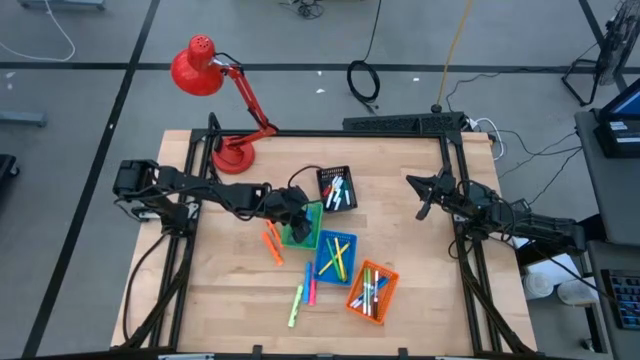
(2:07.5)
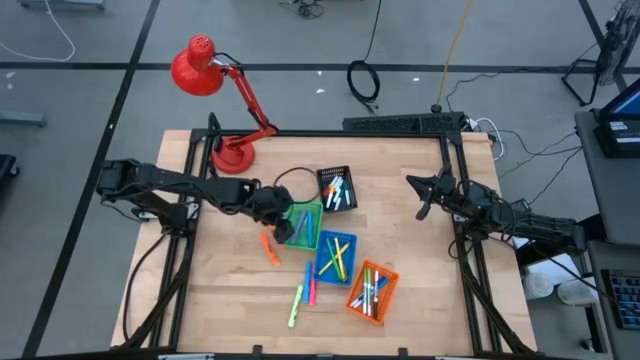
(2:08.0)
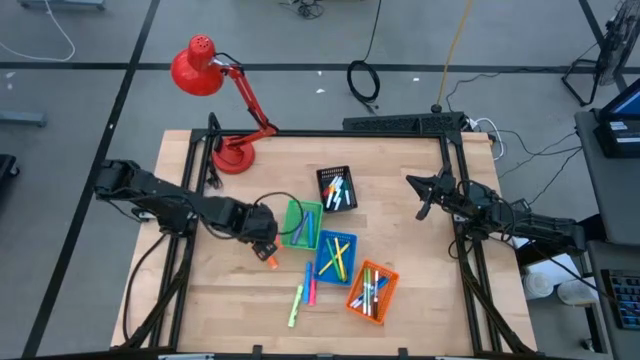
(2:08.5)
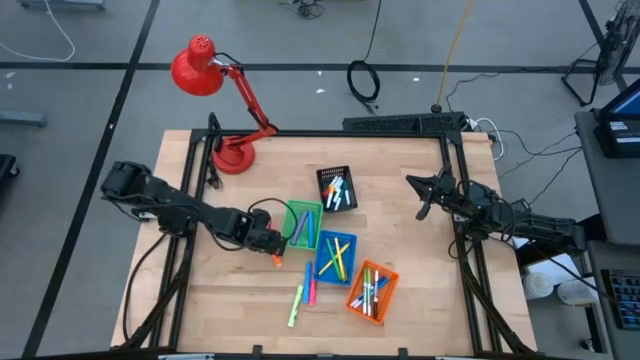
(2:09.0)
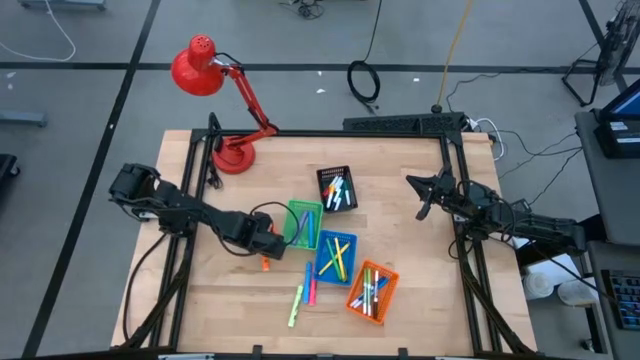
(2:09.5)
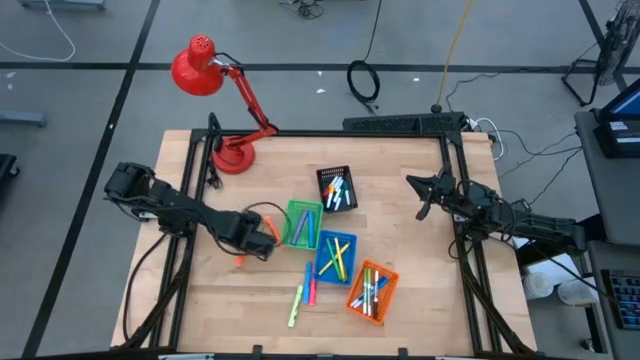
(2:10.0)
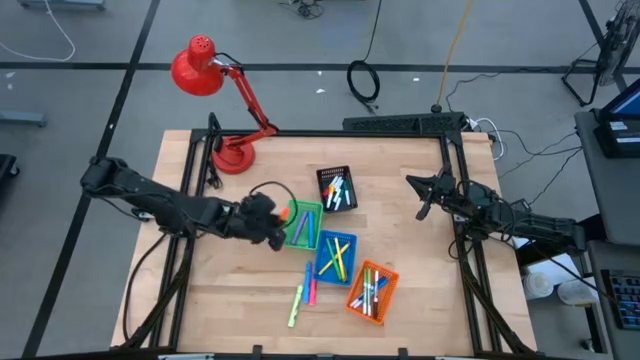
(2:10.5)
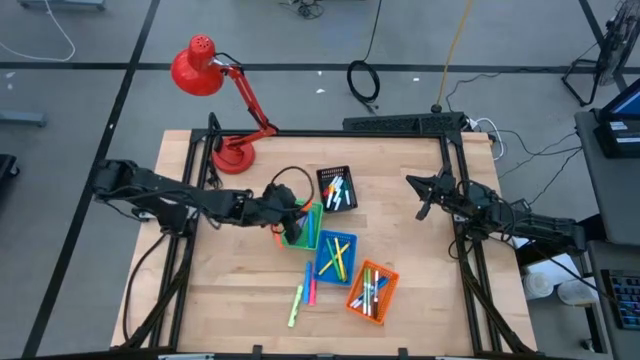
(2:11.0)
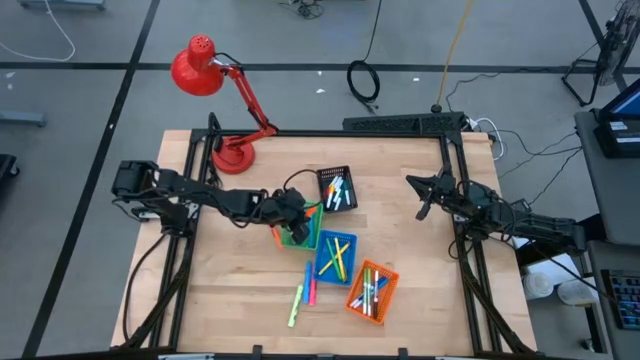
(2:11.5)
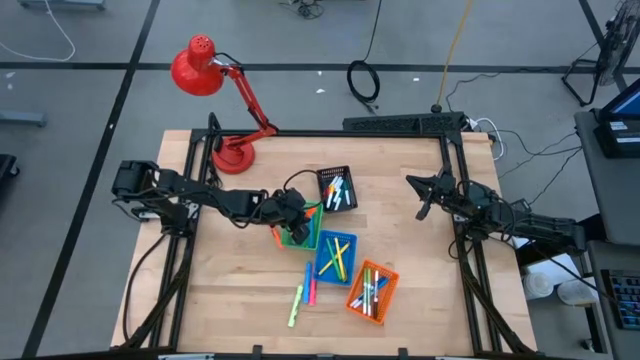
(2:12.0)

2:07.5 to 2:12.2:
Task: Pick & Place Markers
Put the left orange highlighter into the green basket

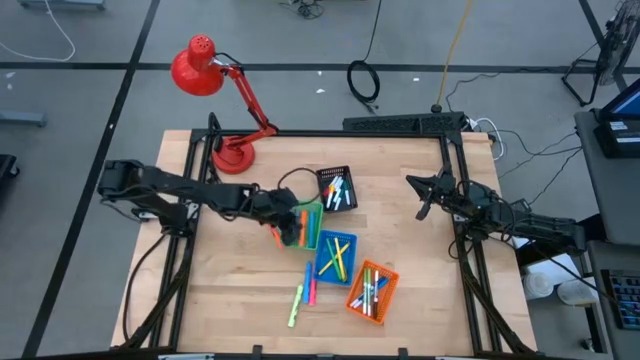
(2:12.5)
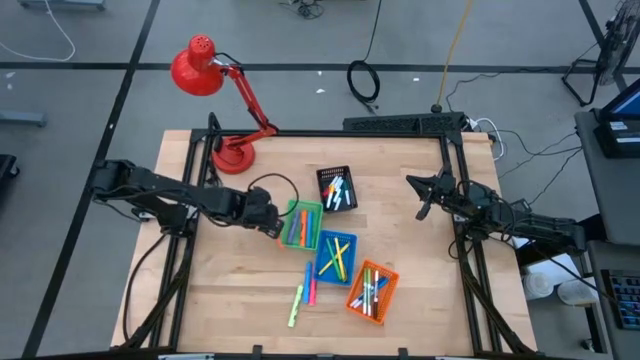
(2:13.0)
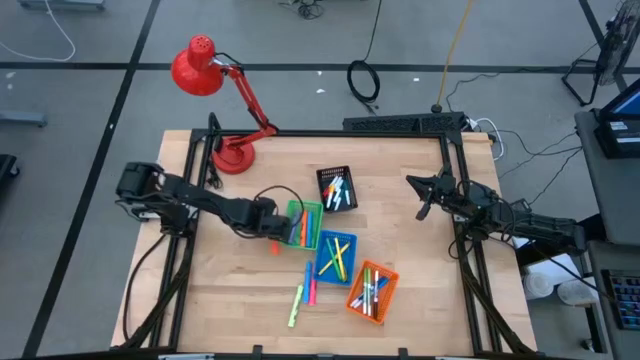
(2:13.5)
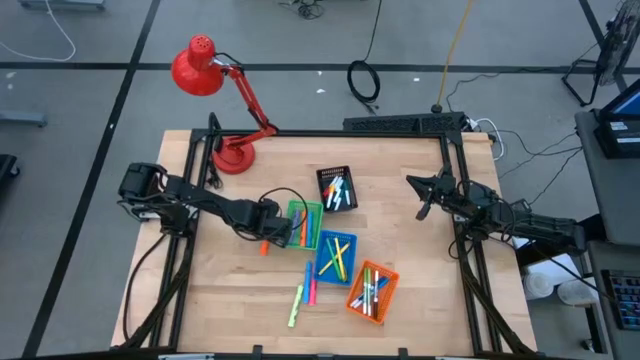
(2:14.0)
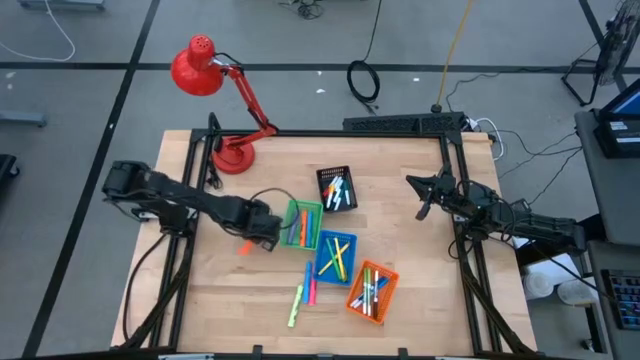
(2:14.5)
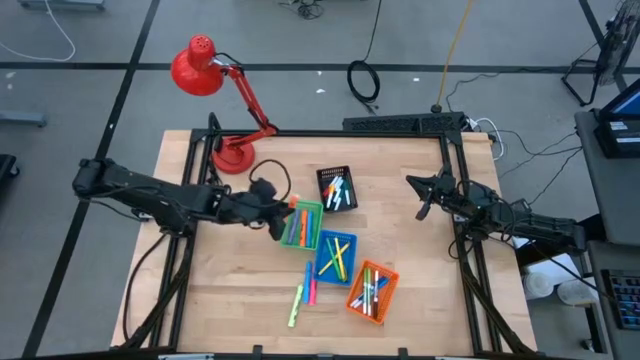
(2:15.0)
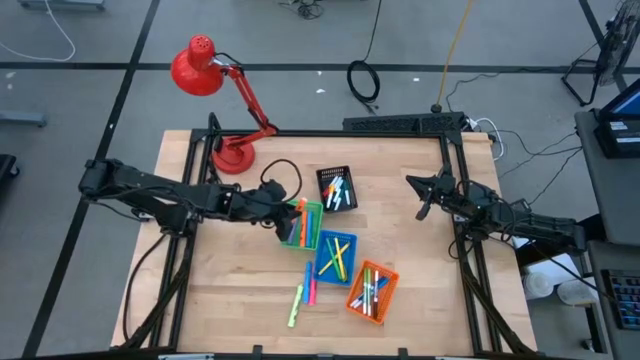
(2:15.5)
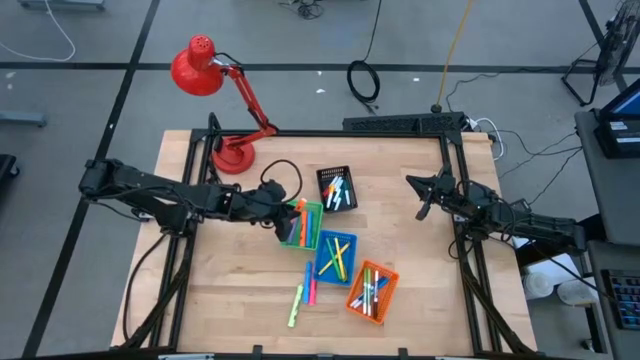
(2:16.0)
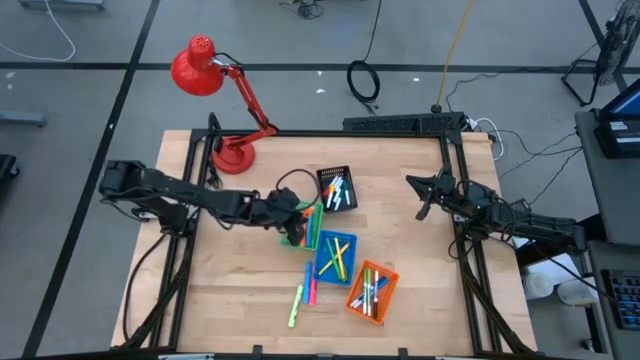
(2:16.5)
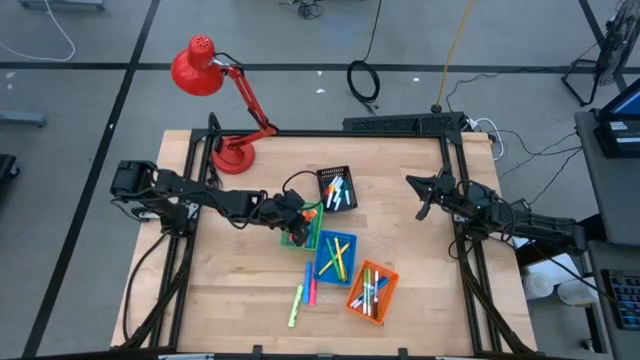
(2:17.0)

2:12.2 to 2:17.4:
Put the orange highlighter into the green basket

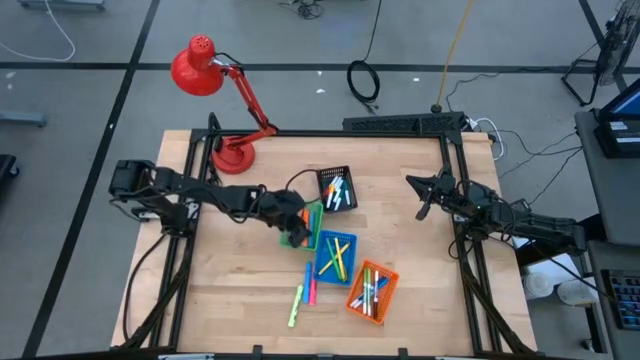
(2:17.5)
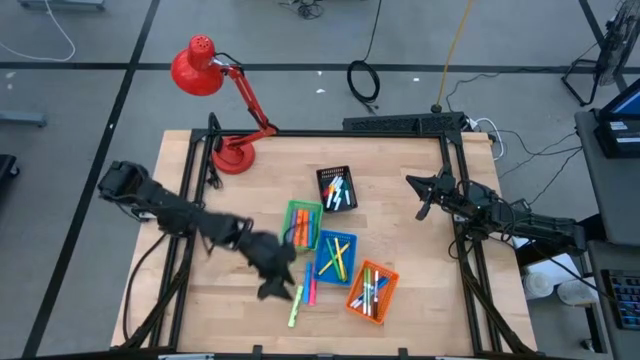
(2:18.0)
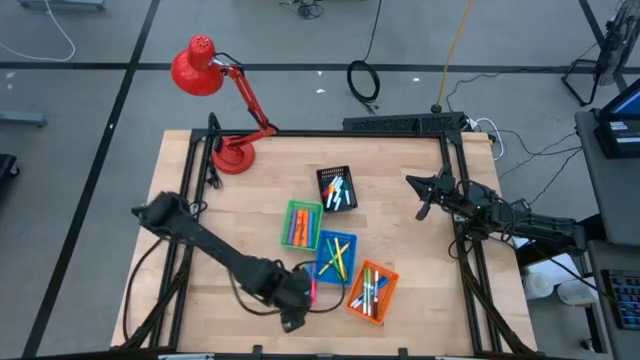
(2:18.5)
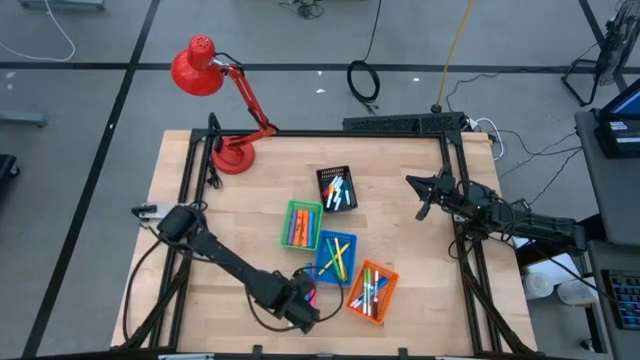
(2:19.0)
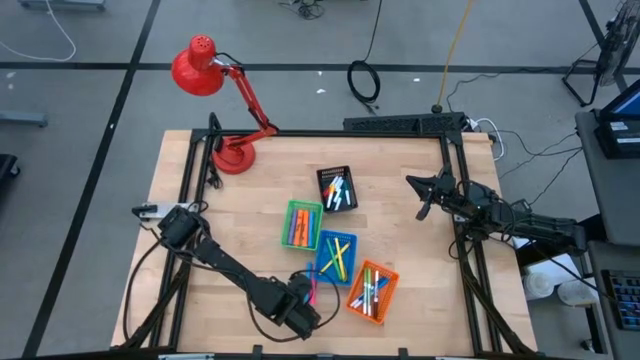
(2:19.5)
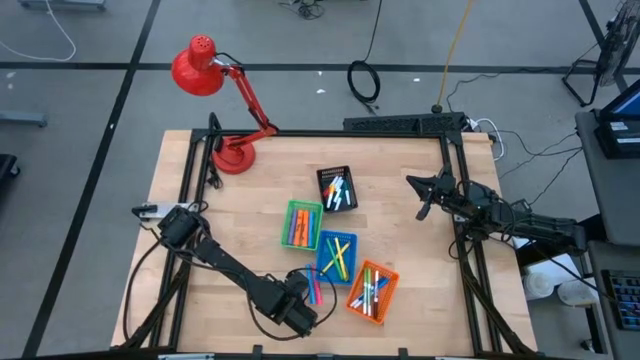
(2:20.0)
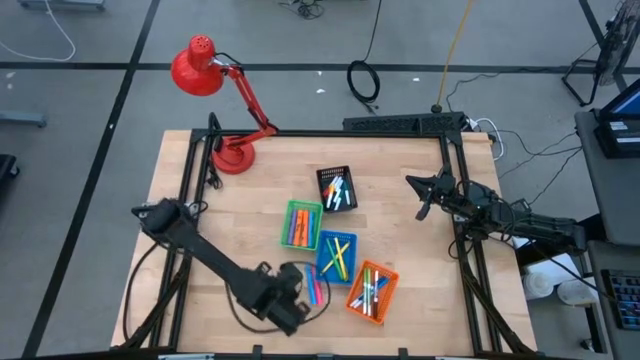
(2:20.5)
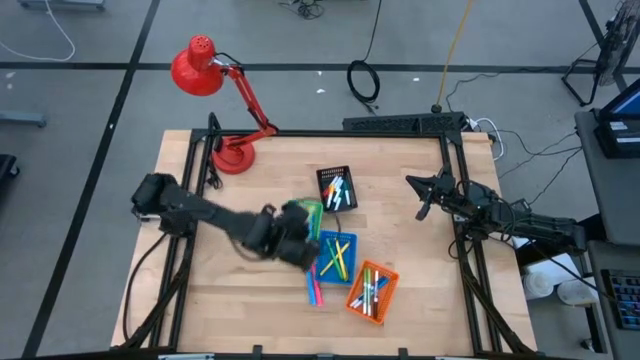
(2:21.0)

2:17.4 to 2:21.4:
Put the light green highlighter into the green basket

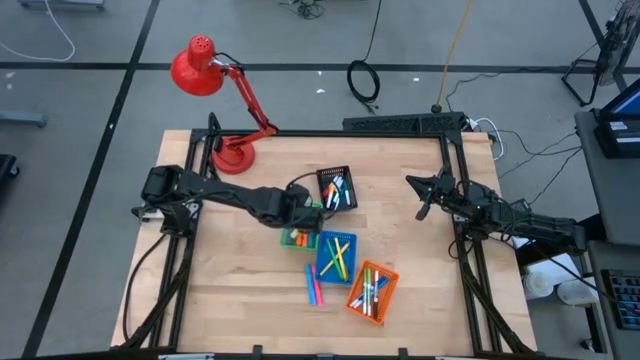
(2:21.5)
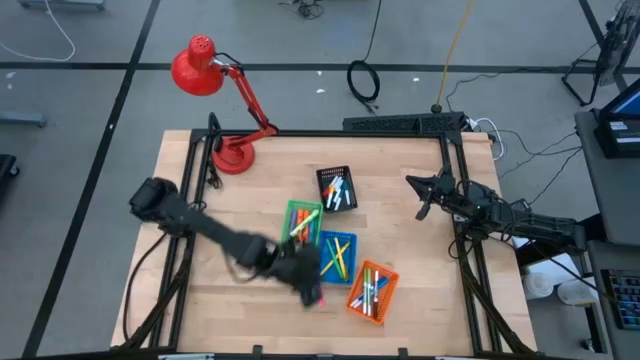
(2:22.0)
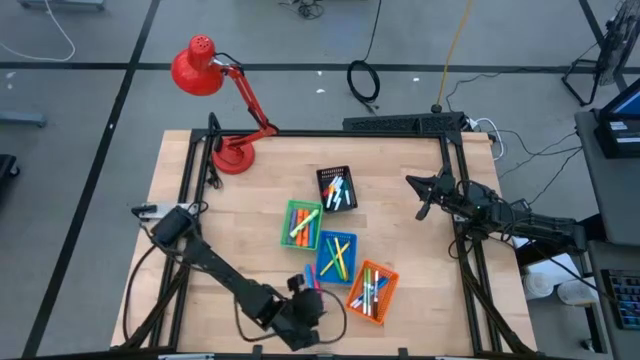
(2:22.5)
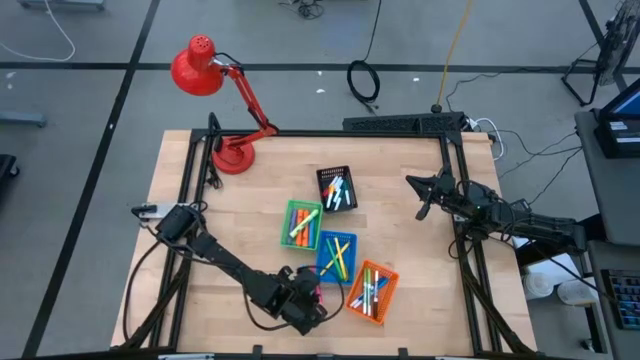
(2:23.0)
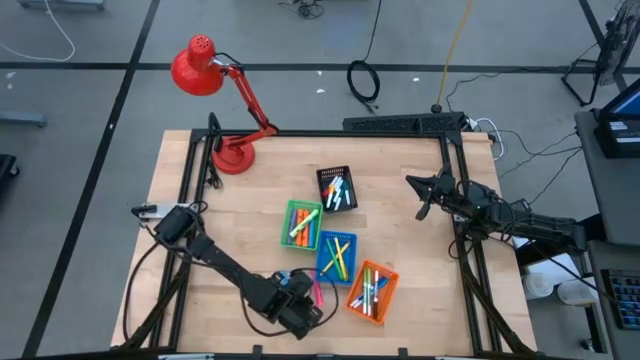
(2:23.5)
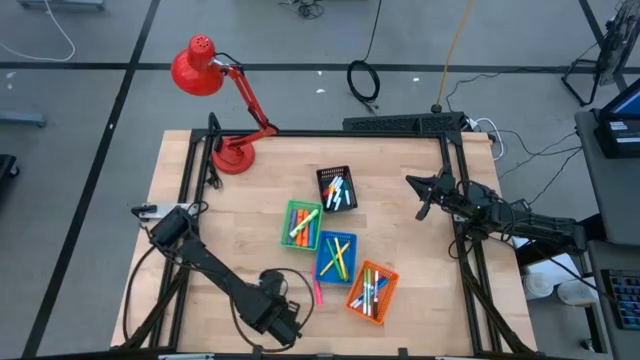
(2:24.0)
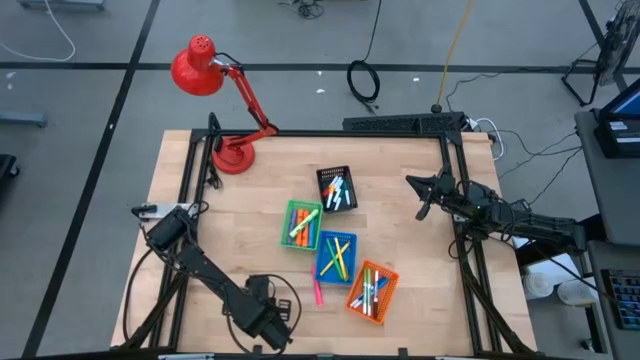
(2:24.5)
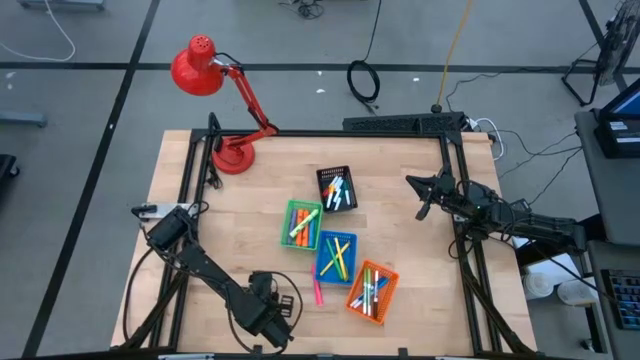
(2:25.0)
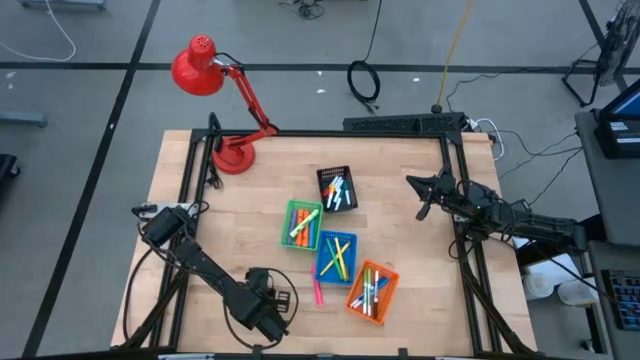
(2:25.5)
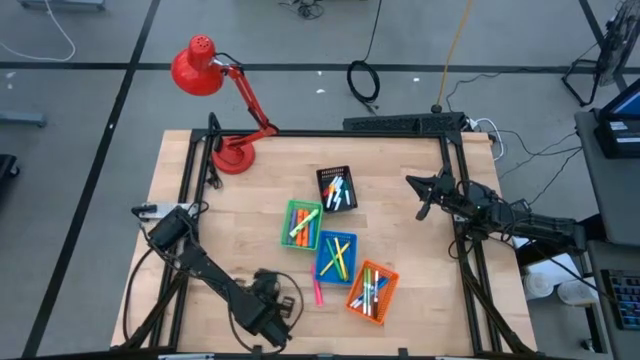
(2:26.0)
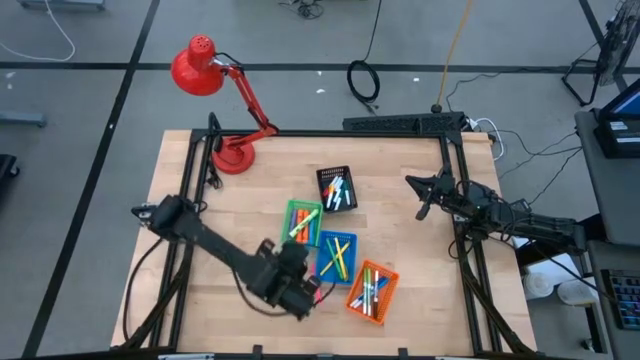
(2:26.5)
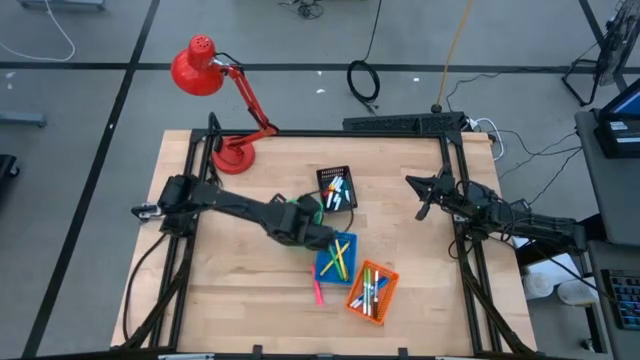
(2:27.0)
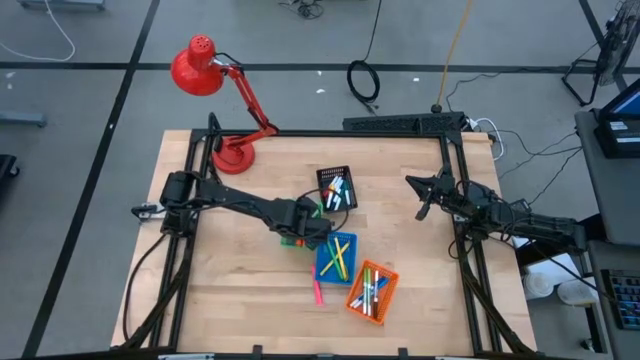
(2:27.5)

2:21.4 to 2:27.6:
Put the blue highlighter into the green basket
